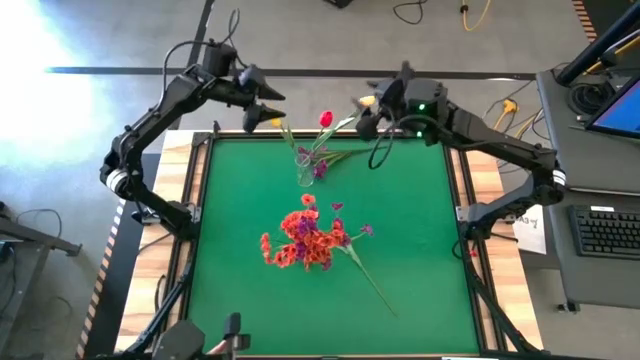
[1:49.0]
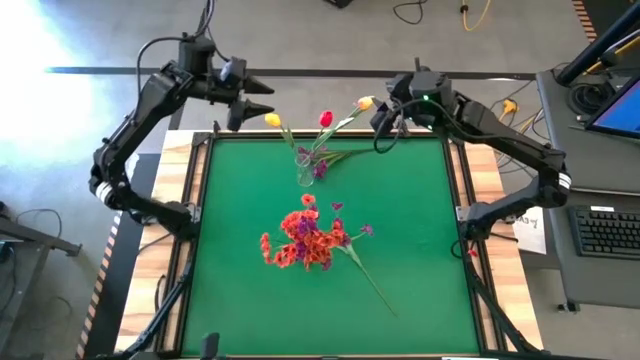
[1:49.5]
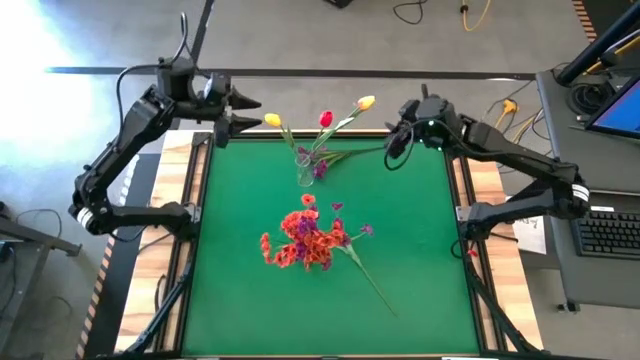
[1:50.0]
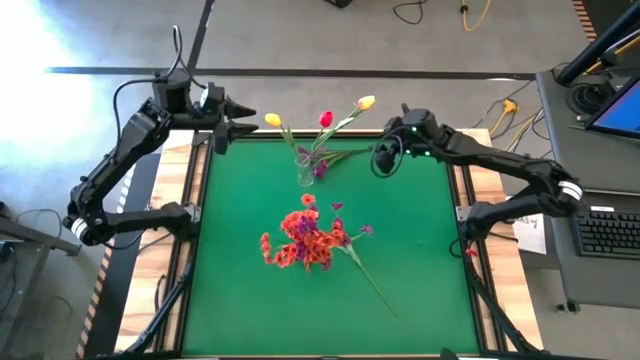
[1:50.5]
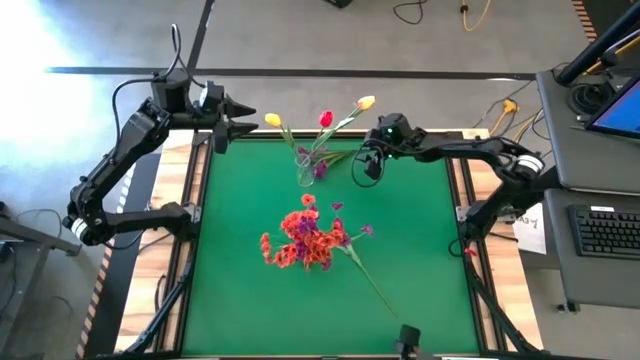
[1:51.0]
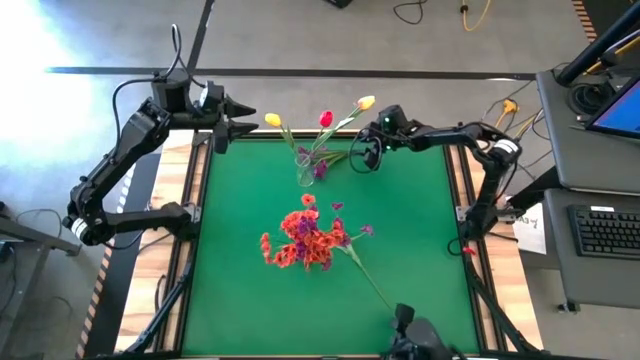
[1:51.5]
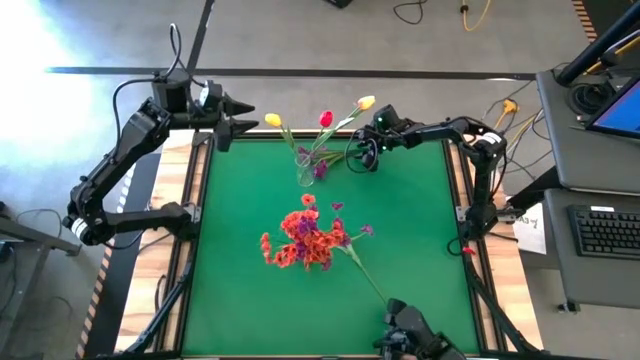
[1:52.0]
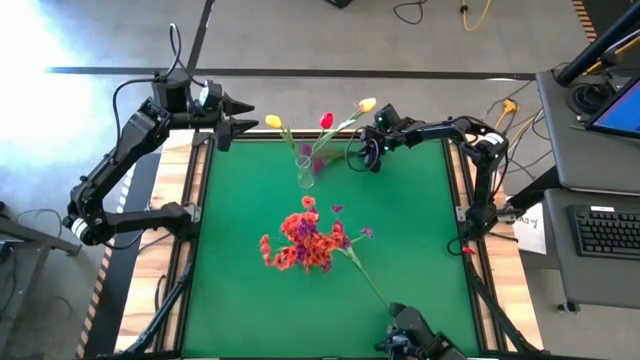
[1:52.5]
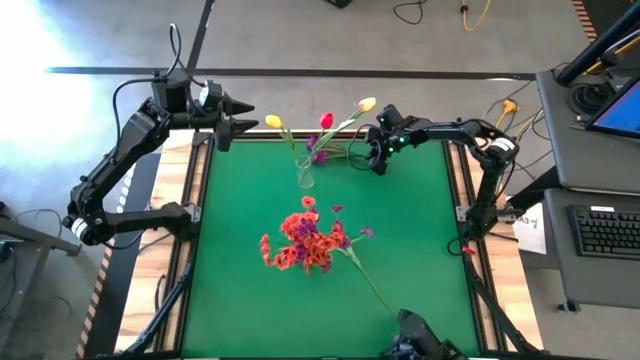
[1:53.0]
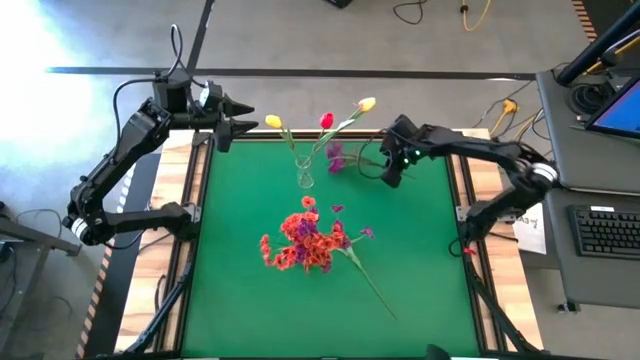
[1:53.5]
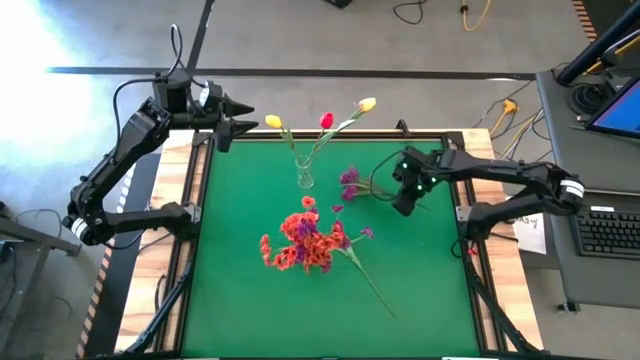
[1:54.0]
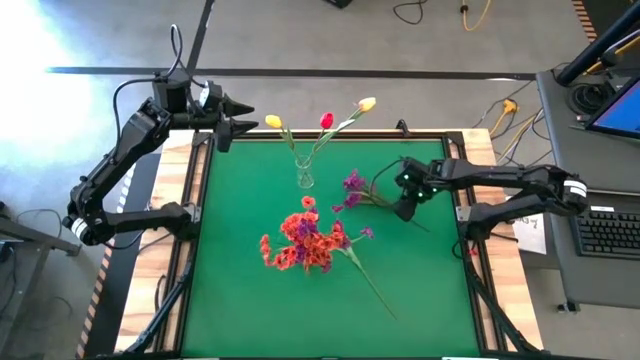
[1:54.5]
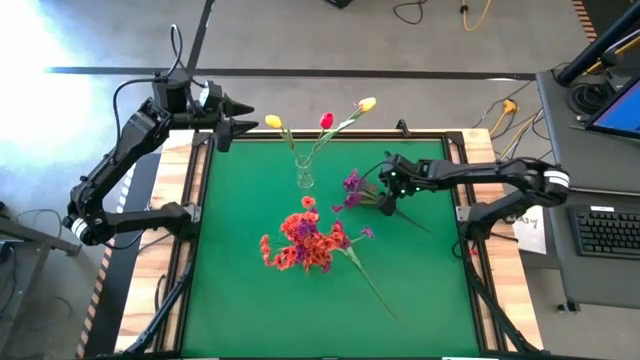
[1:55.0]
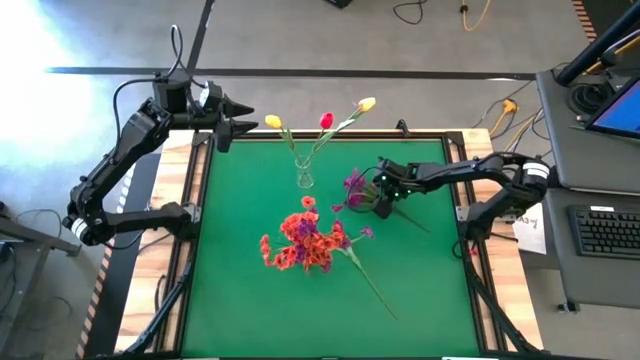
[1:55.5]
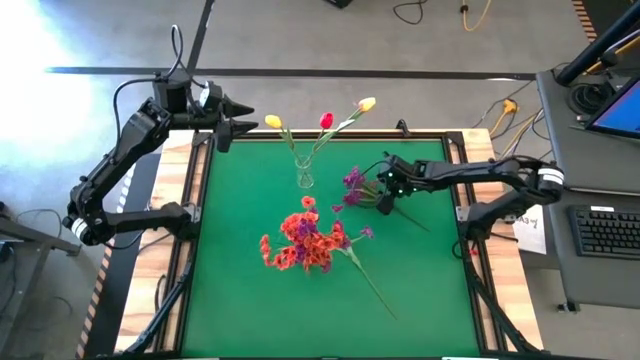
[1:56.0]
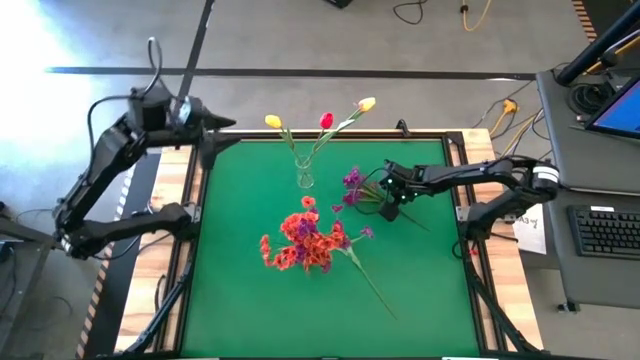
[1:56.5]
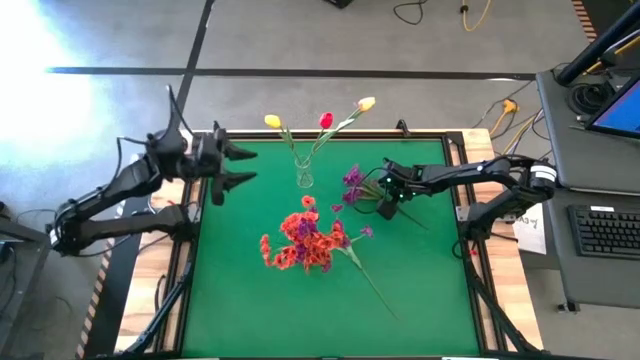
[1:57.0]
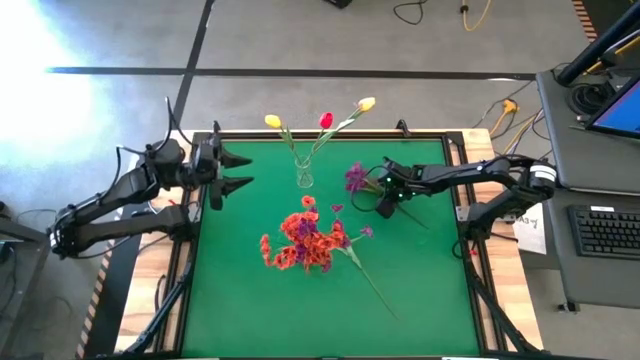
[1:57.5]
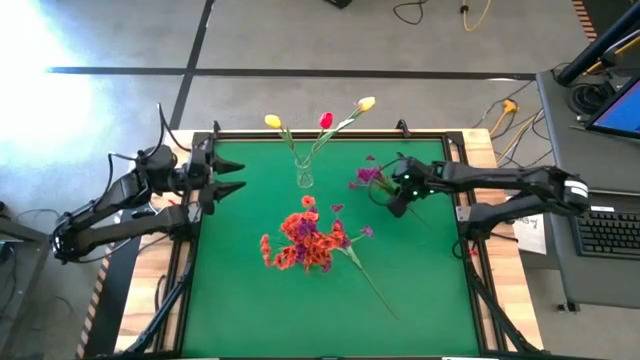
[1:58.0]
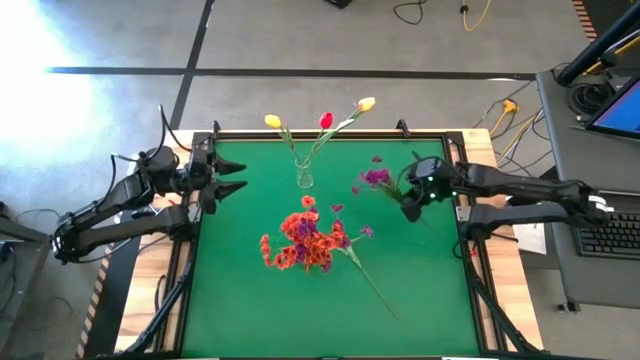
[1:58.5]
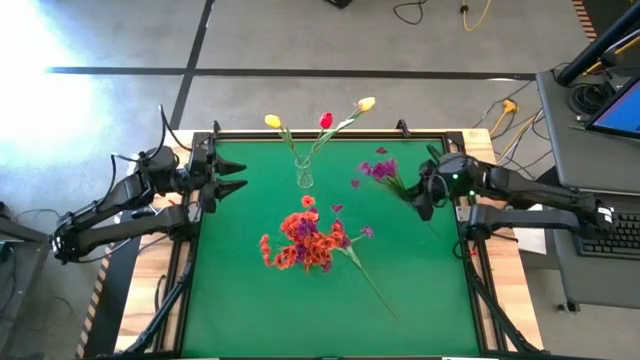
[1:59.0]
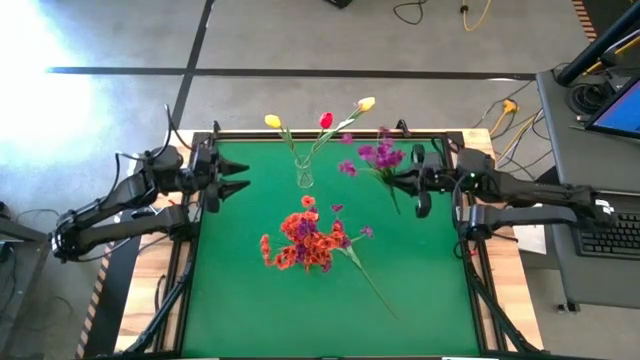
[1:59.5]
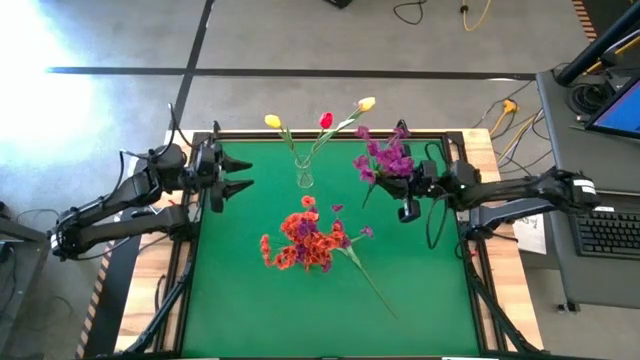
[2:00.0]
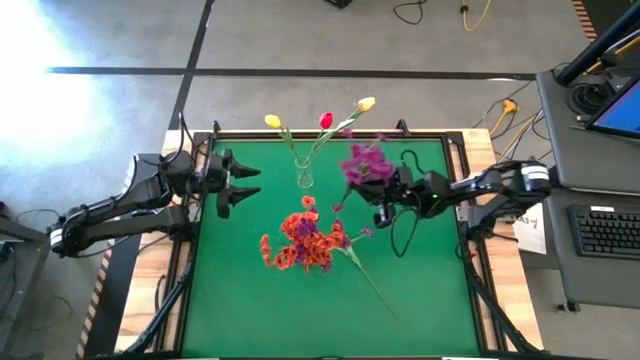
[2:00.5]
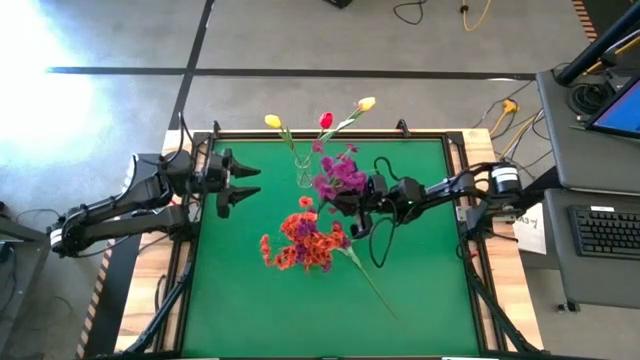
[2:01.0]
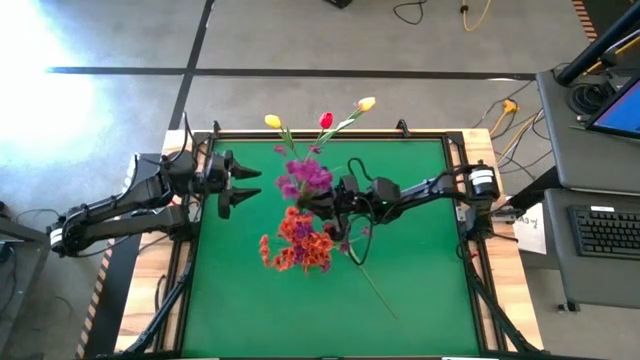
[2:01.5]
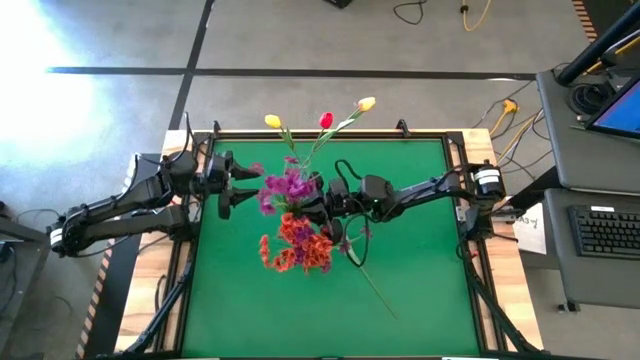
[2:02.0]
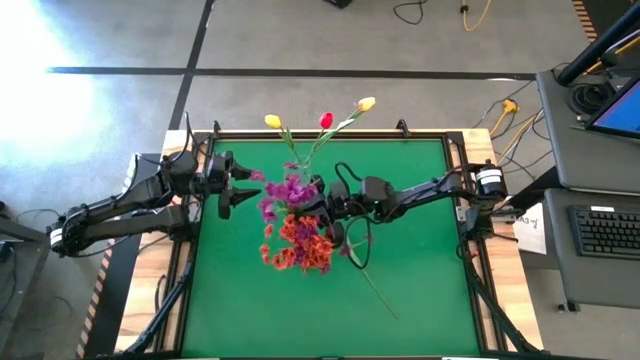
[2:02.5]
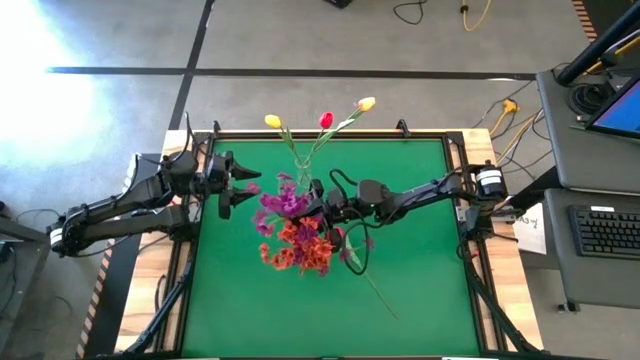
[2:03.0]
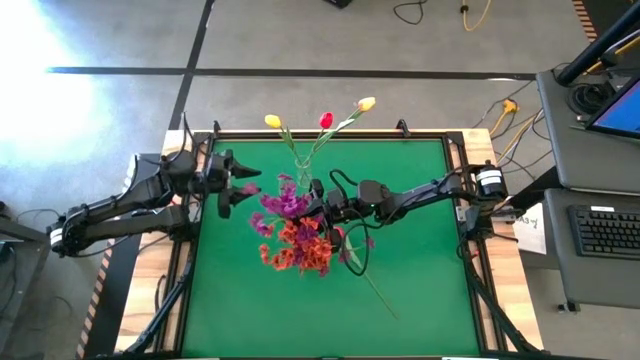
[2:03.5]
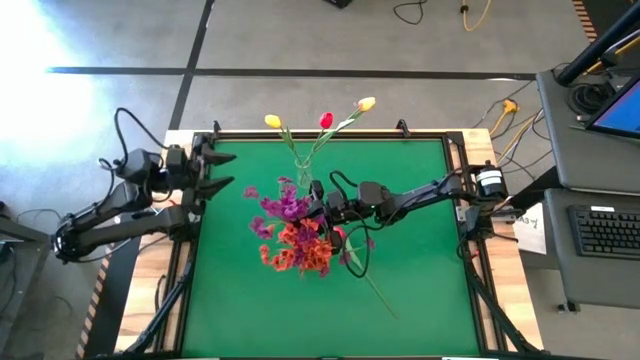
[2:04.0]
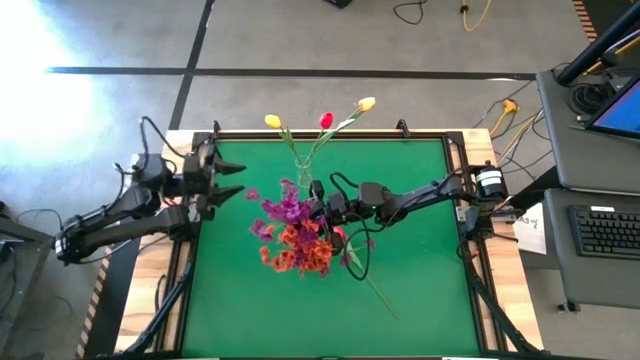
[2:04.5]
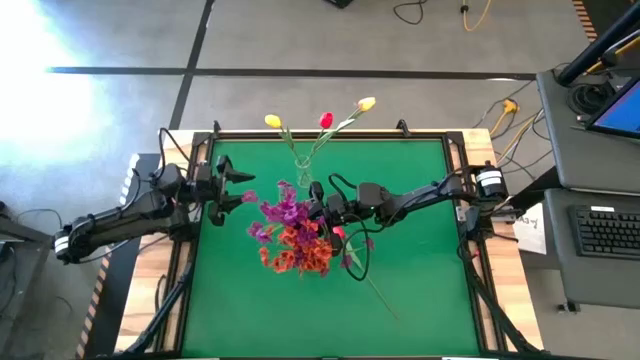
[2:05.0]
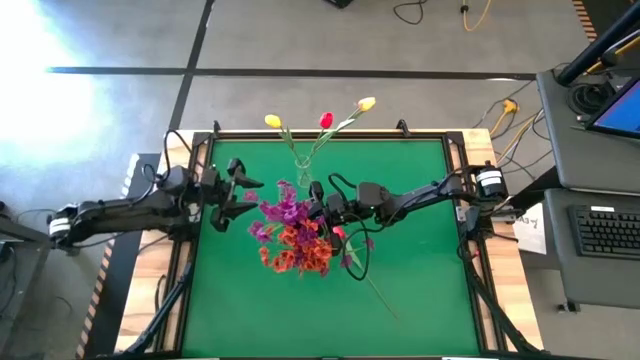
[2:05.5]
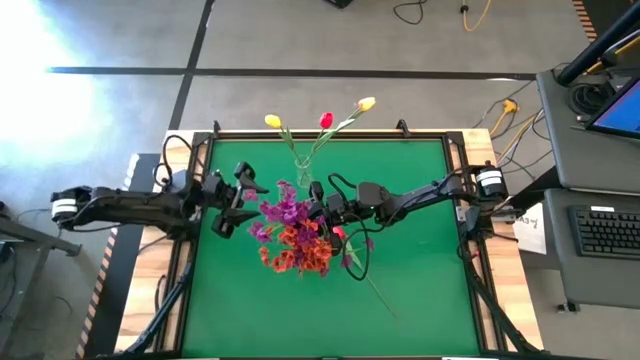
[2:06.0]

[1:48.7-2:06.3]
Task: Sort flowers into vase by color
Put the violet flowers into the green vase

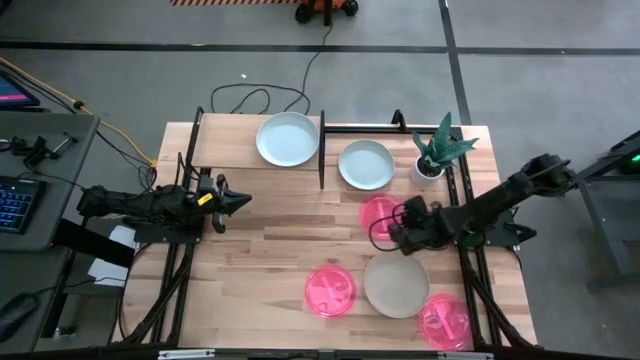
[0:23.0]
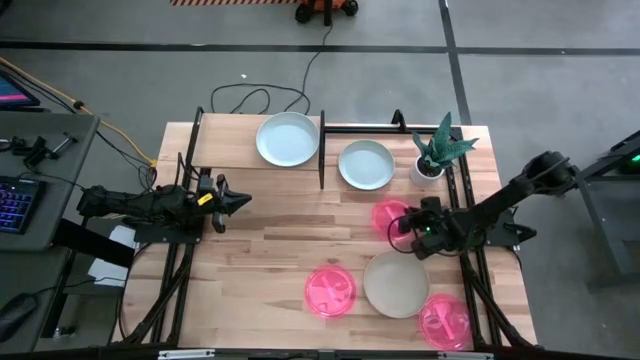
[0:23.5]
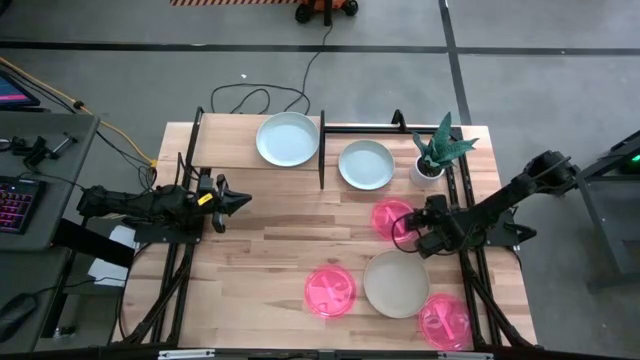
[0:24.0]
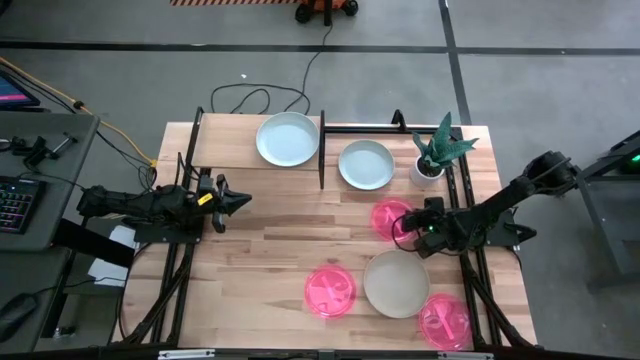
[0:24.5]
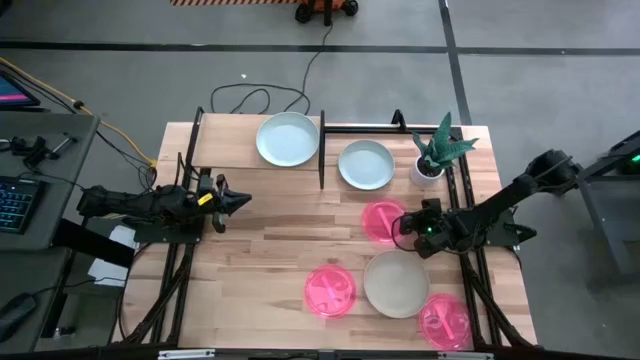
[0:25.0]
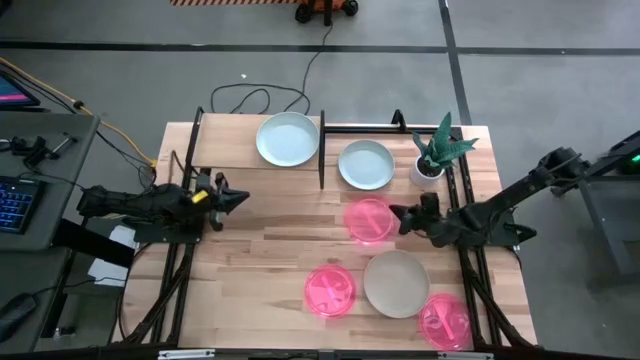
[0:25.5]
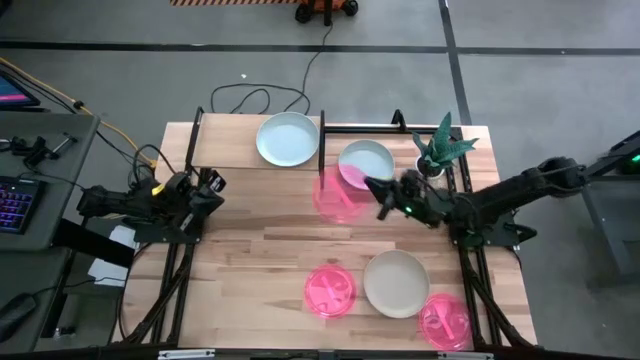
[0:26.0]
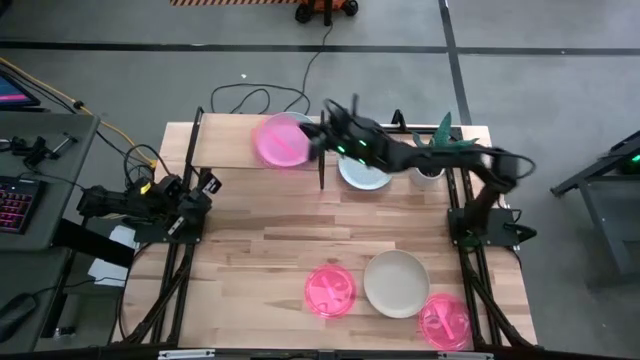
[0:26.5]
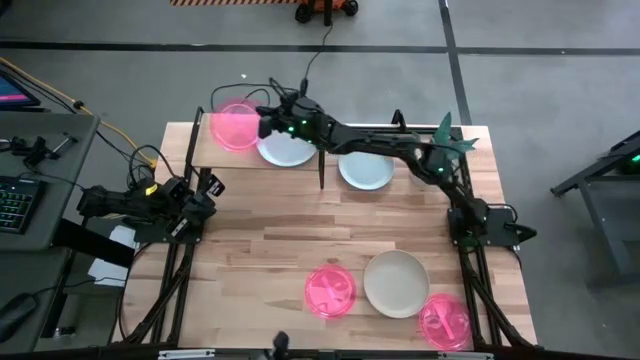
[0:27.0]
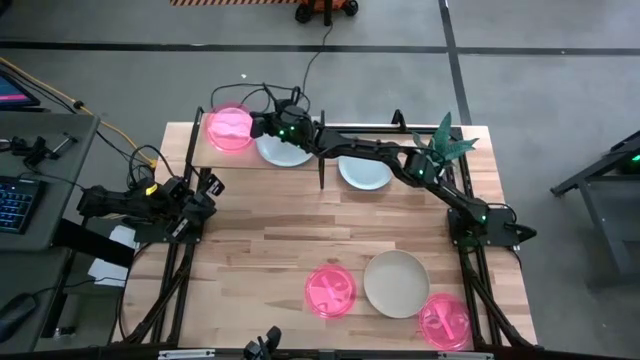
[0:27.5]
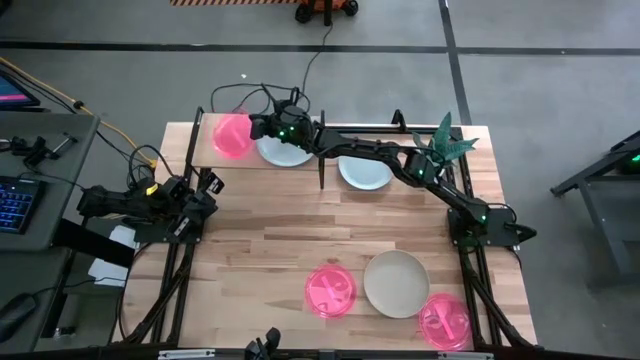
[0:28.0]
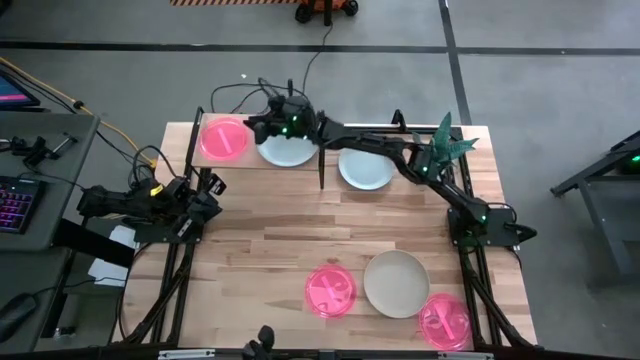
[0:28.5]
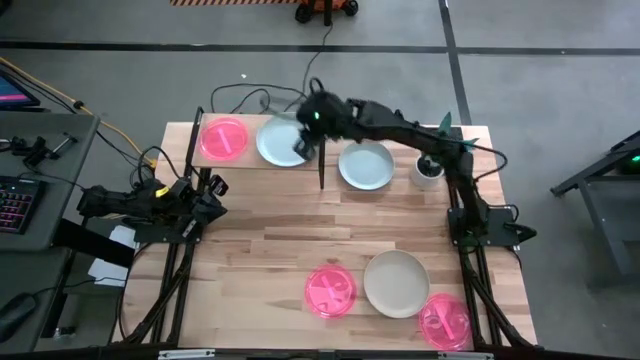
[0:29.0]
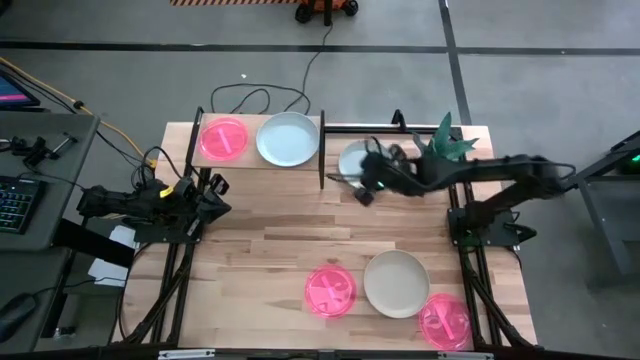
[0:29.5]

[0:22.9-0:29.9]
Task: Place and stack plates onto a shelf
Put the top transparent pink plate on the shelf
